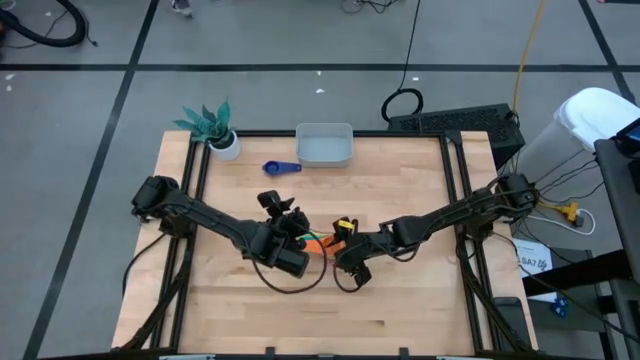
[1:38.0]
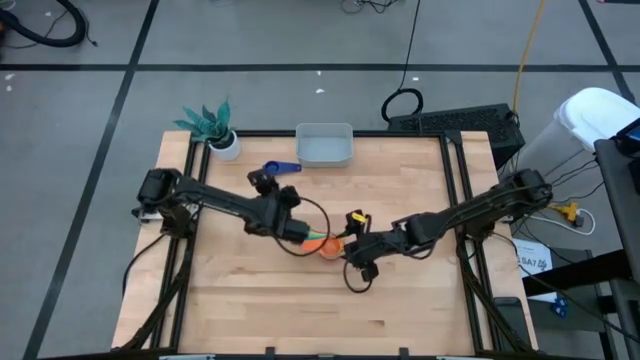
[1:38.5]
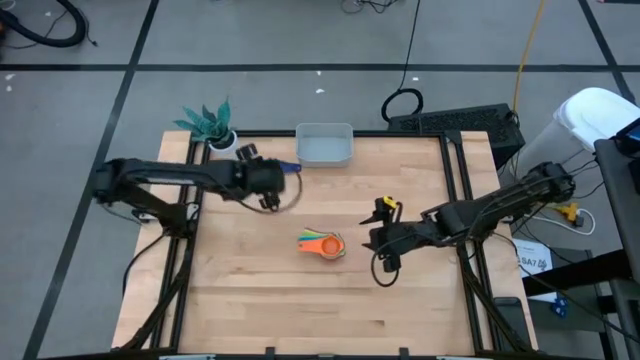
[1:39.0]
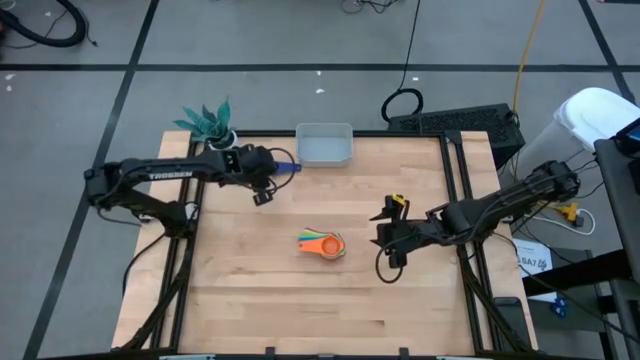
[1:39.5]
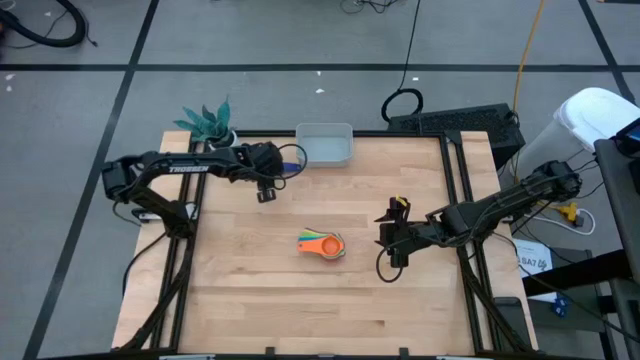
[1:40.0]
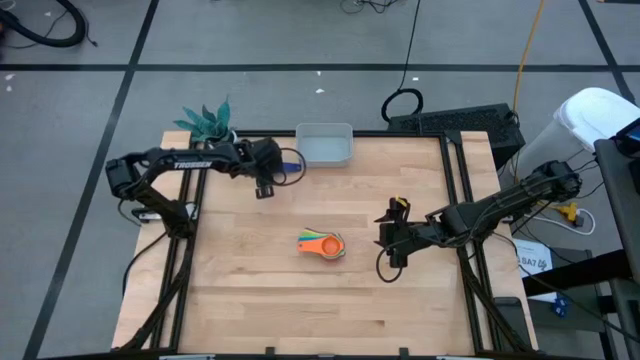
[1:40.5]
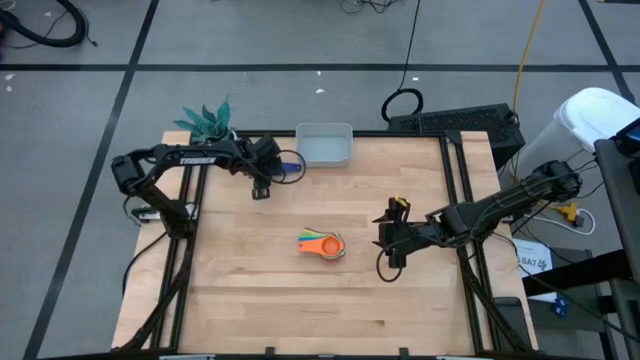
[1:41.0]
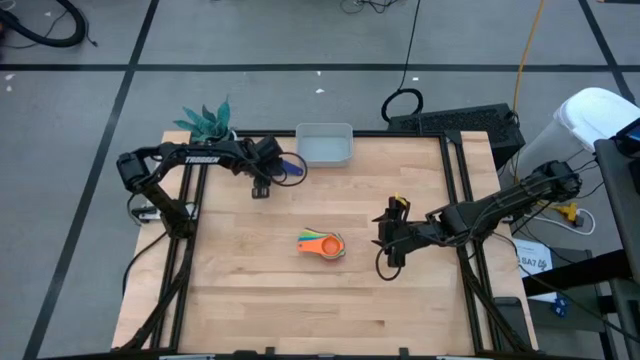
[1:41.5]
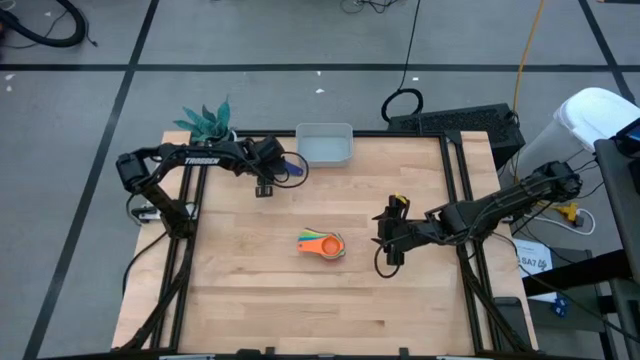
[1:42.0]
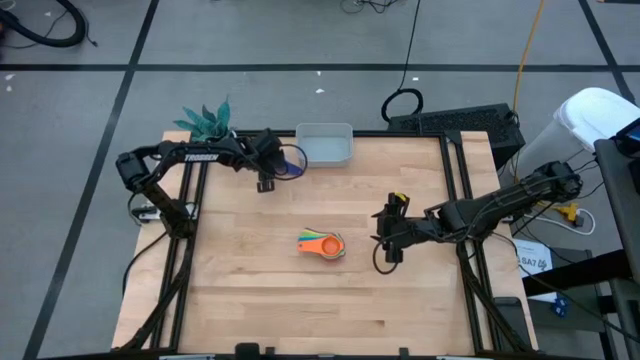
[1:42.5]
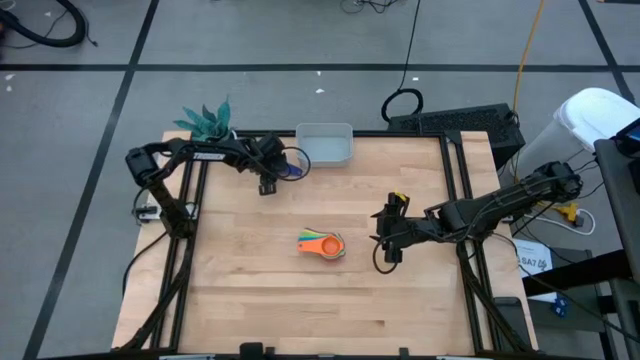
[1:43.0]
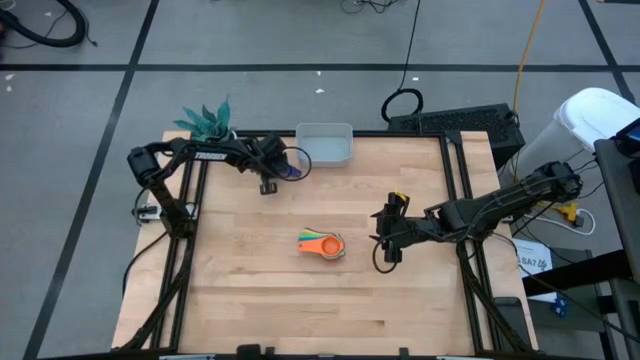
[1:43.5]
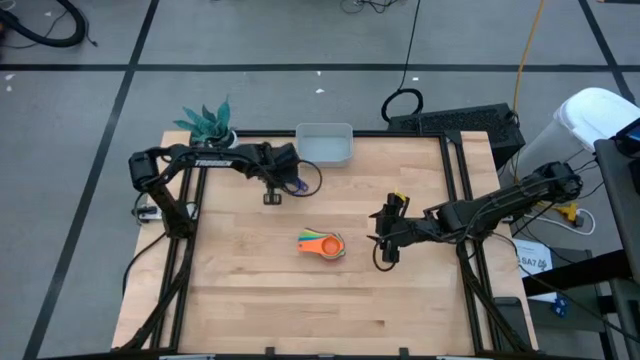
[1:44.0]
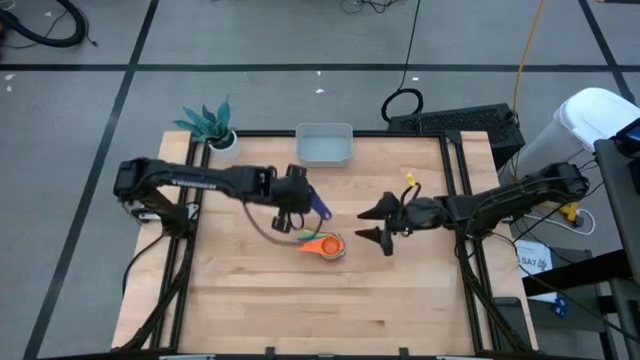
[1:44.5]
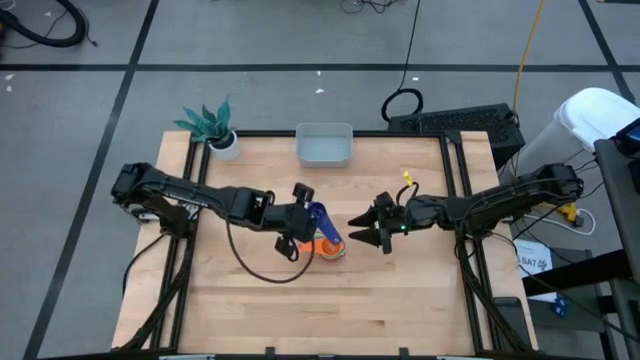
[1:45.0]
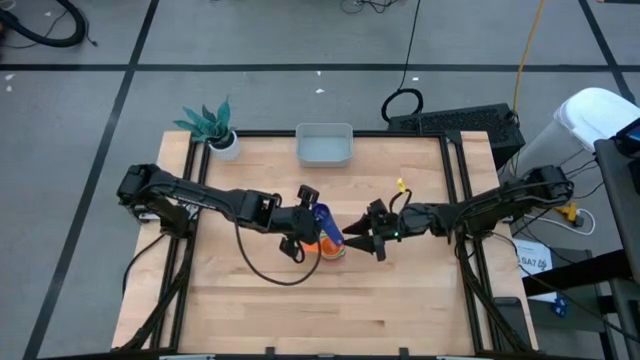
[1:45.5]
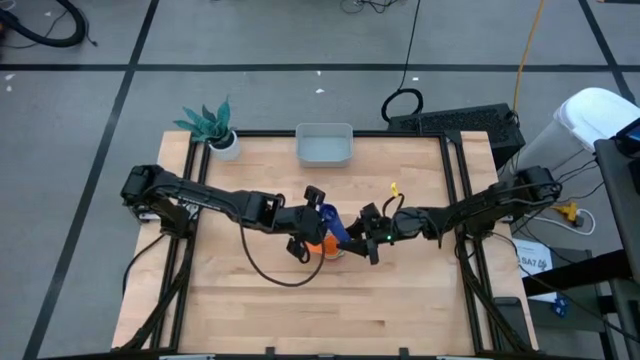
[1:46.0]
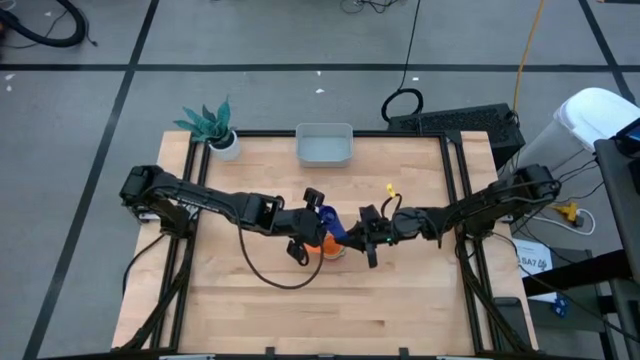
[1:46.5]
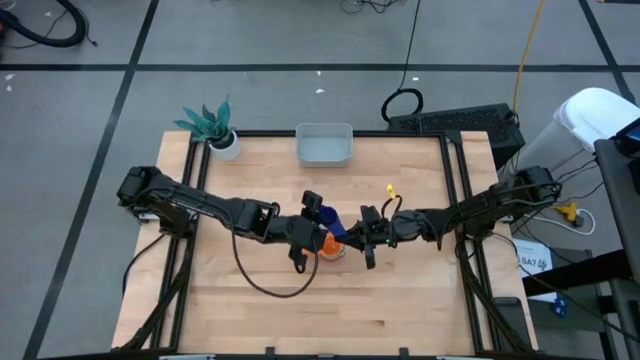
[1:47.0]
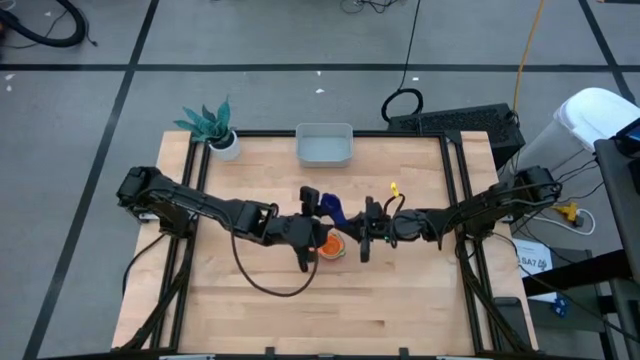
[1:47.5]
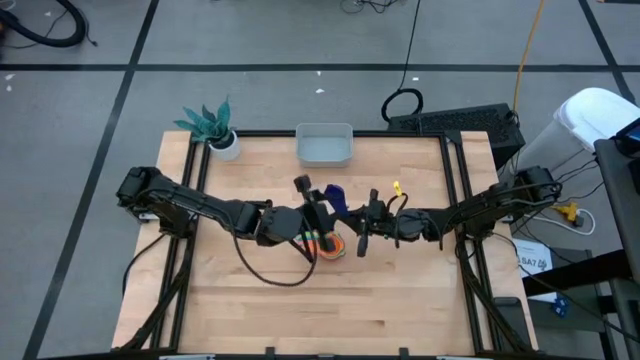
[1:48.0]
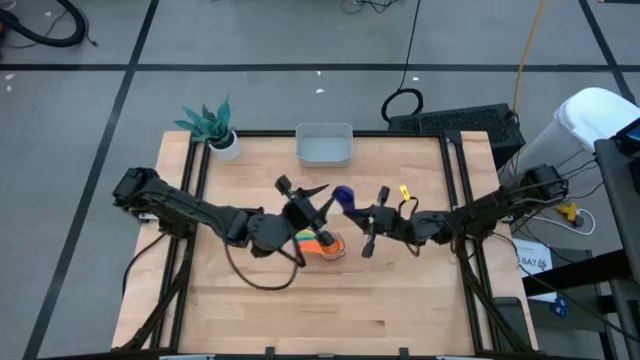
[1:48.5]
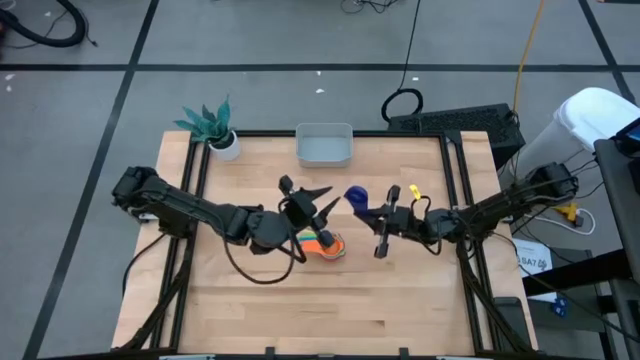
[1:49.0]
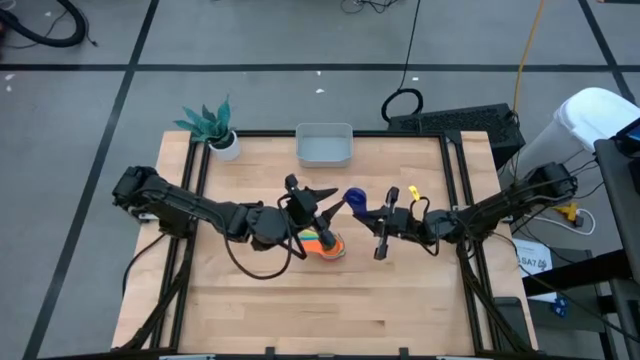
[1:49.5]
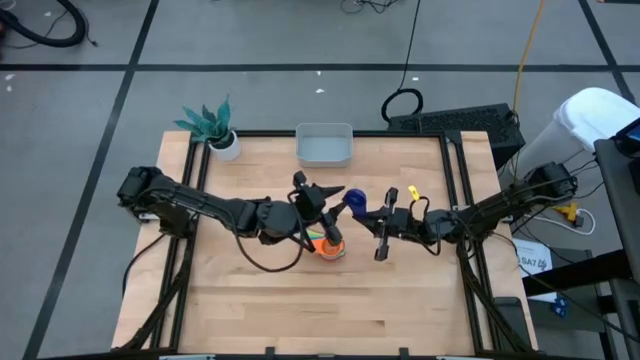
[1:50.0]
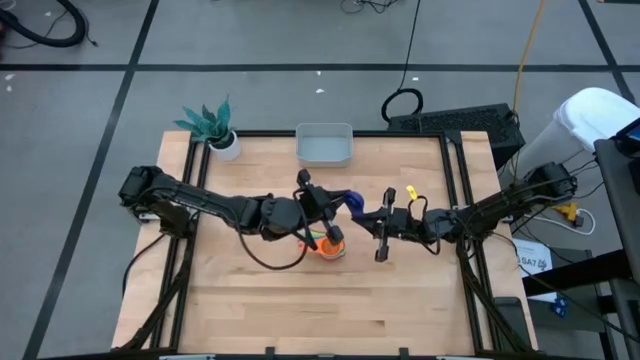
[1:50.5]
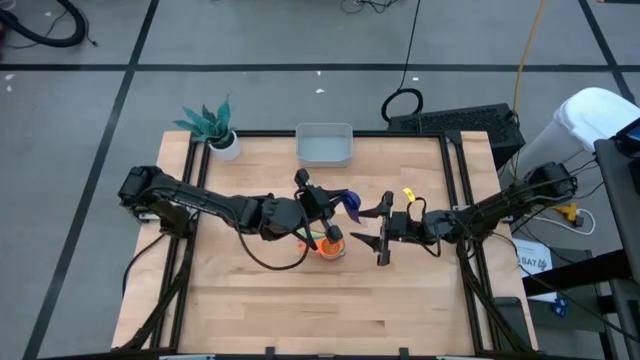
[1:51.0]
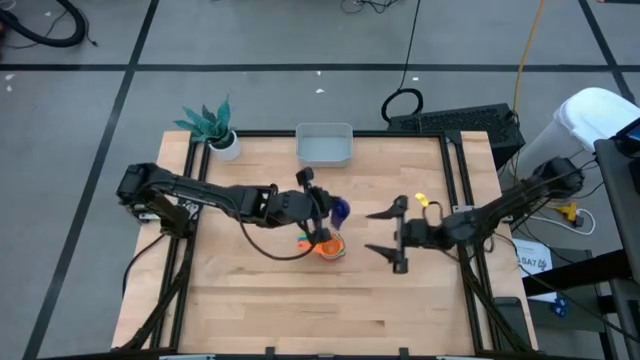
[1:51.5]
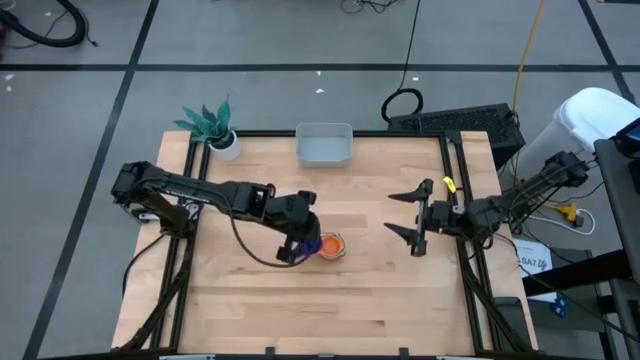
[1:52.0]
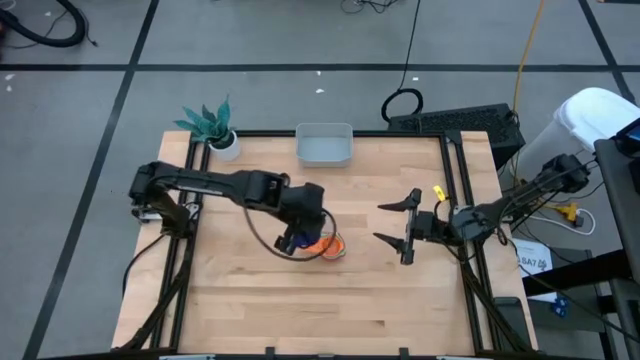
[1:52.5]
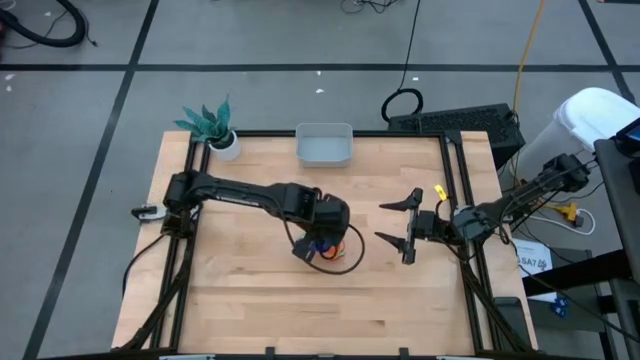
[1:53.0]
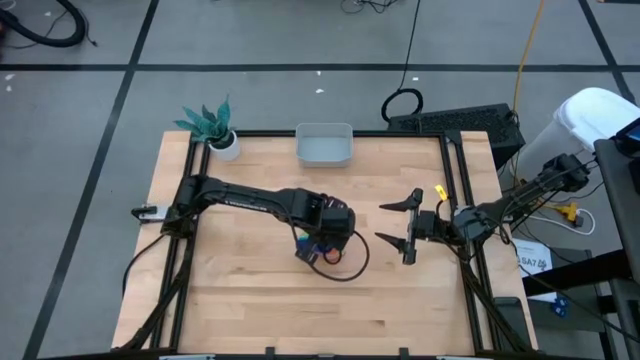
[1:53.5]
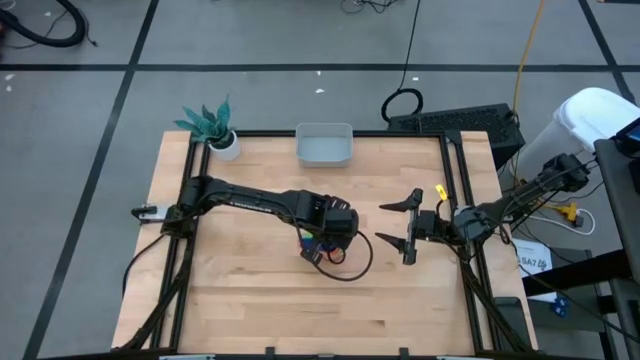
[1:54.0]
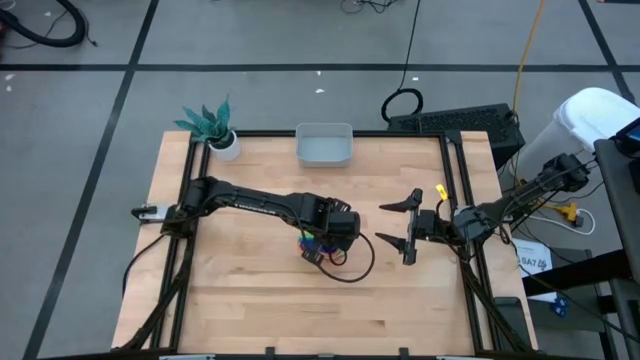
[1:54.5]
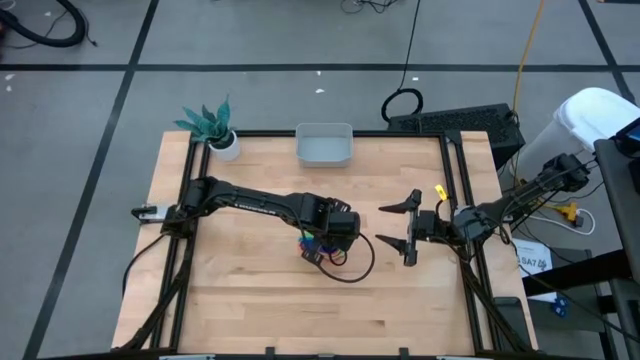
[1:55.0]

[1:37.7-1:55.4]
Task: Nest measuring cups in basket
Stack the dark blue measuring cup on top of the orange measuring cup

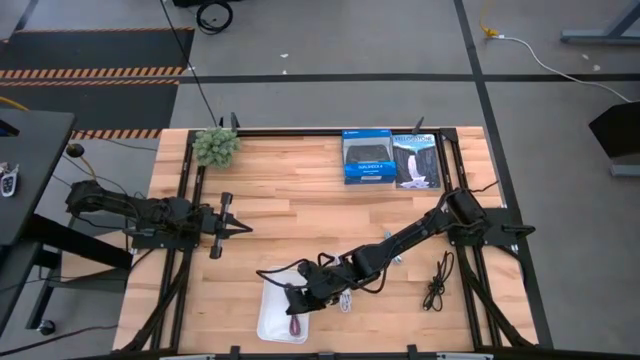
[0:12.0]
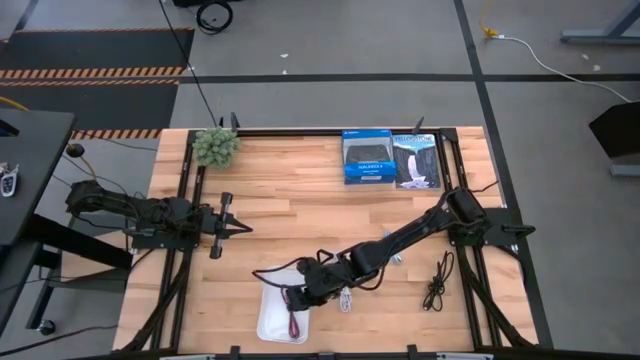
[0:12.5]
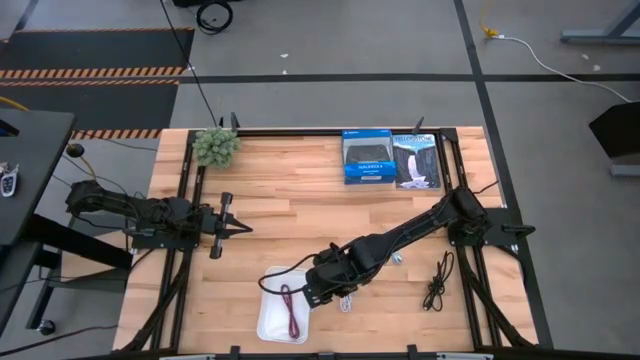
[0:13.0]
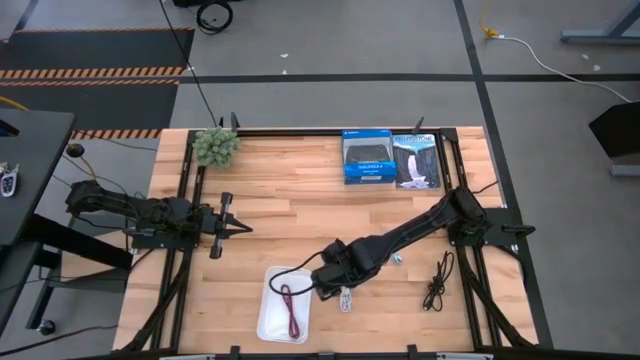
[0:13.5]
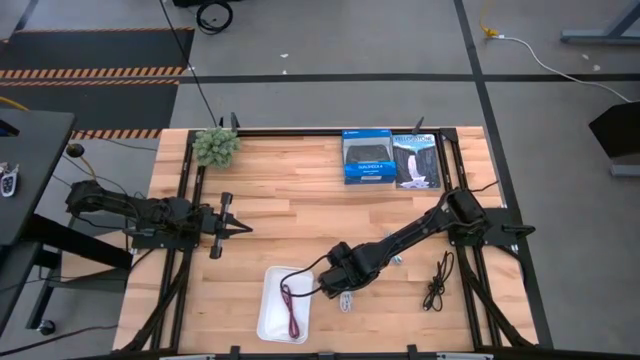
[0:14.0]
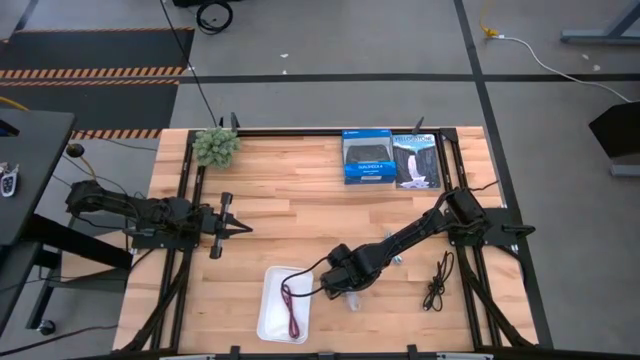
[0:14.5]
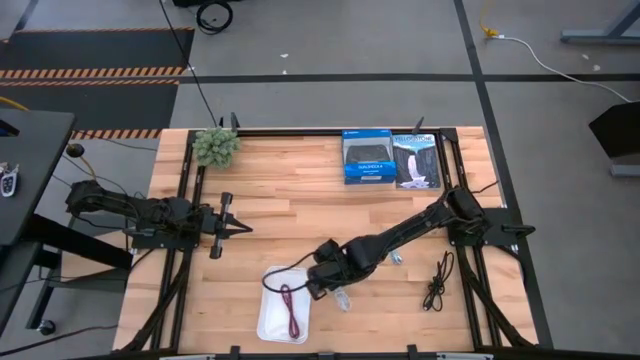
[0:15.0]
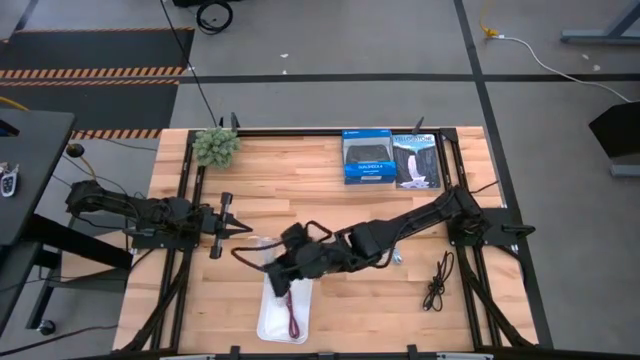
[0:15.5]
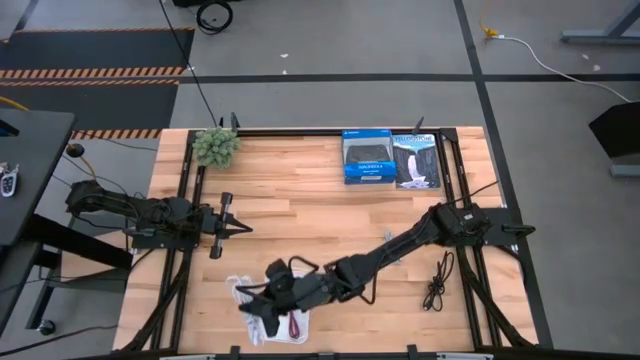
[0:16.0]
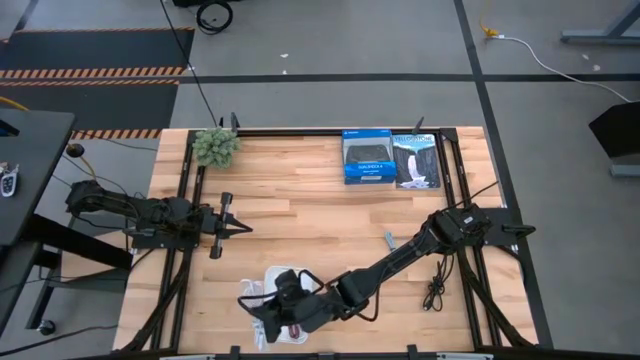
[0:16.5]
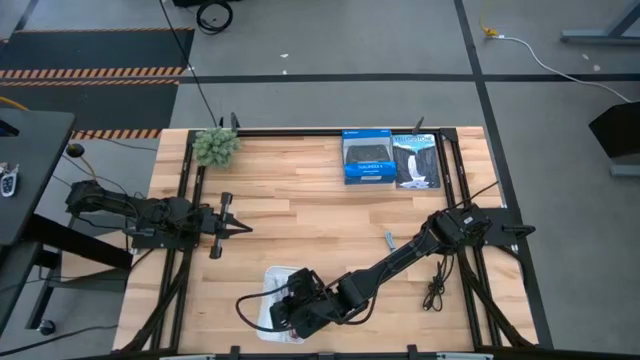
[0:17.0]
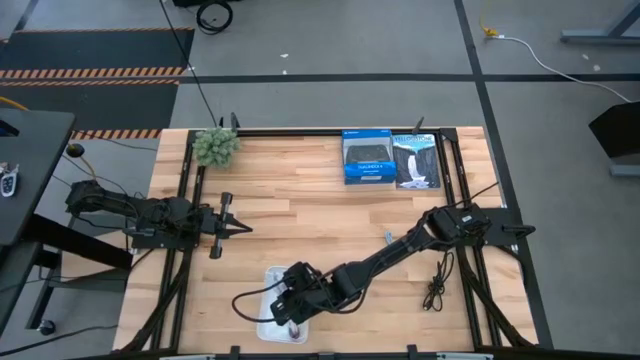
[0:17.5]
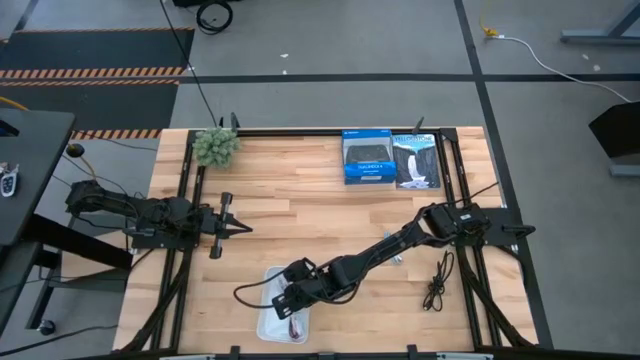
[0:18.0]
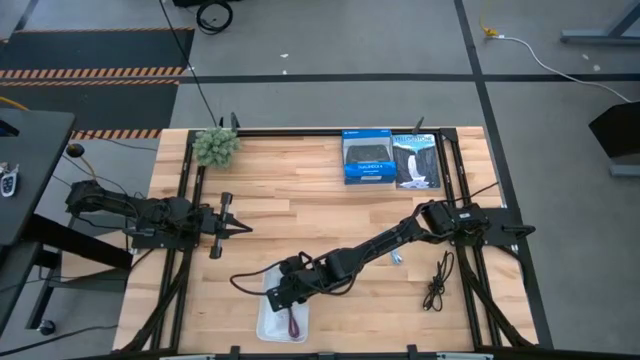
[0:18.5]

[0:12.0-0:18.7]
Task: Pick and place USB-C Cables
Put the white charger cable into the bin
